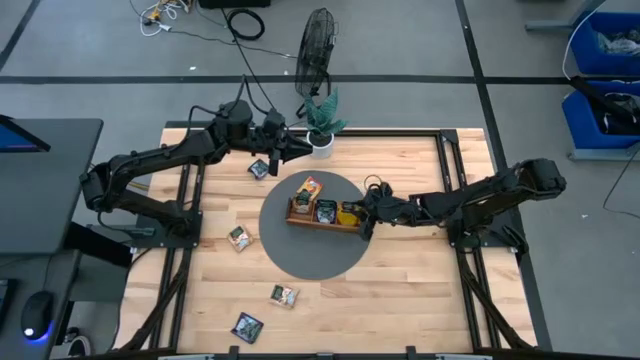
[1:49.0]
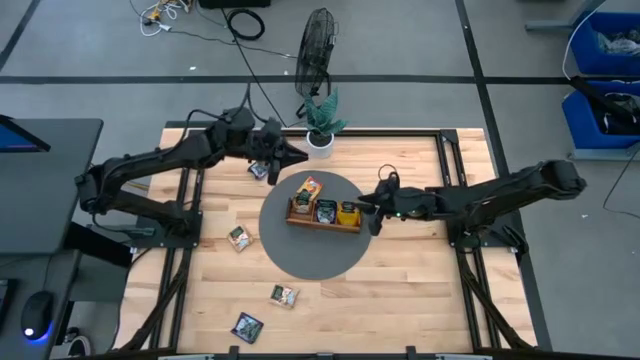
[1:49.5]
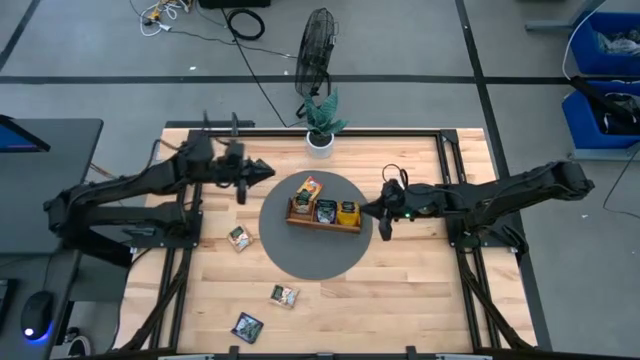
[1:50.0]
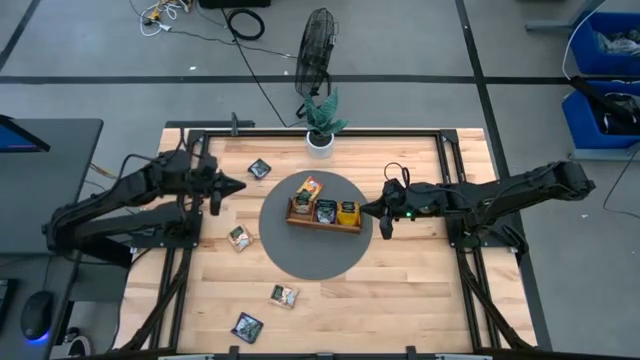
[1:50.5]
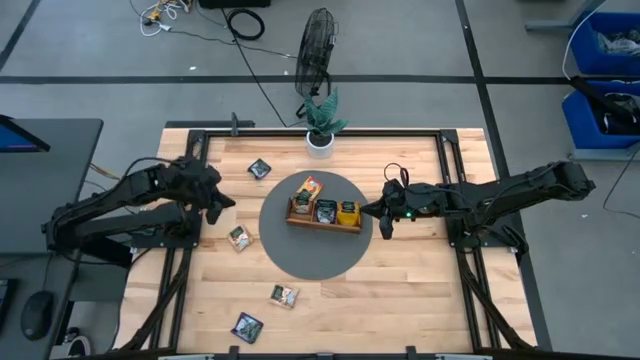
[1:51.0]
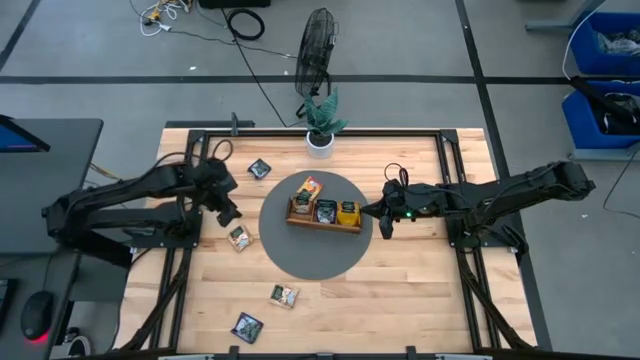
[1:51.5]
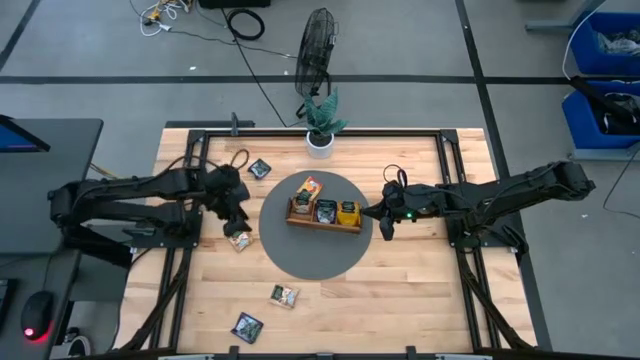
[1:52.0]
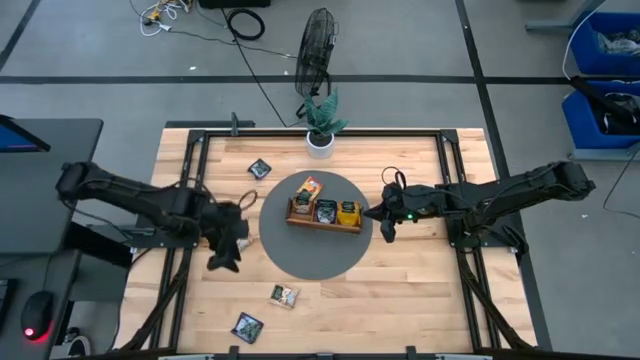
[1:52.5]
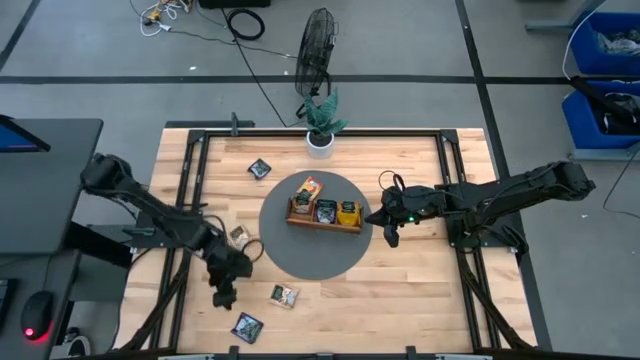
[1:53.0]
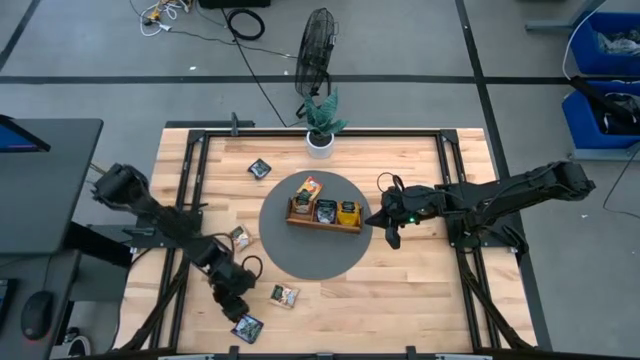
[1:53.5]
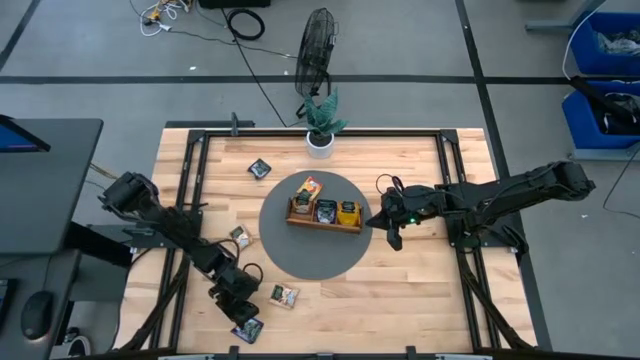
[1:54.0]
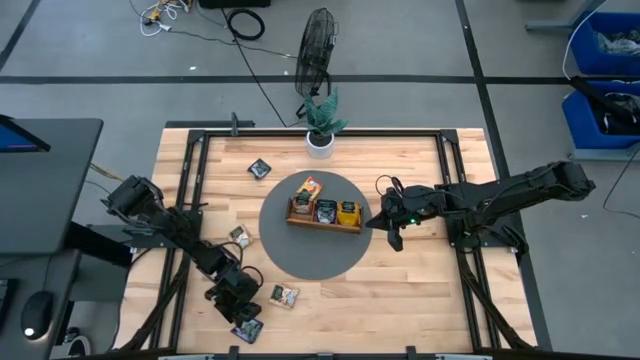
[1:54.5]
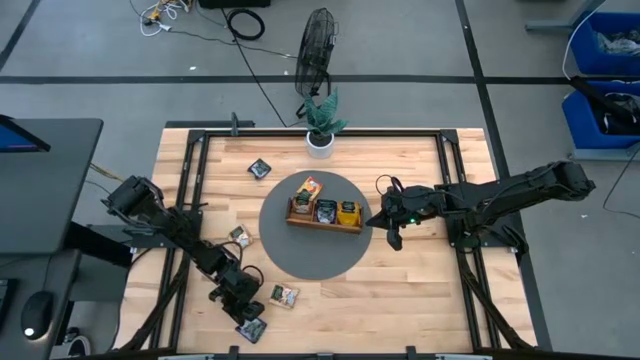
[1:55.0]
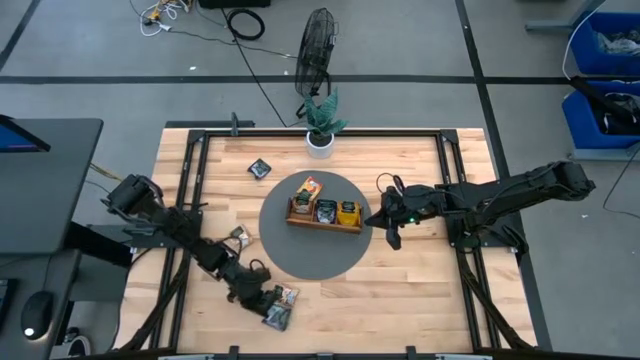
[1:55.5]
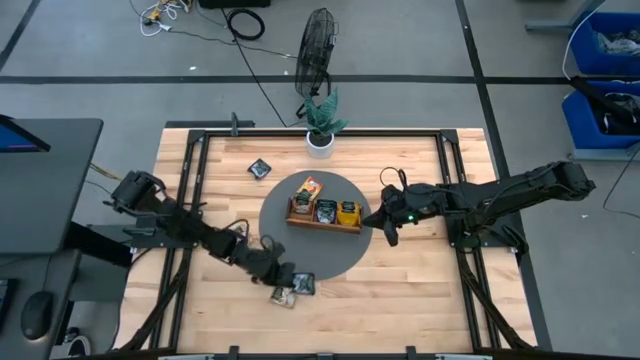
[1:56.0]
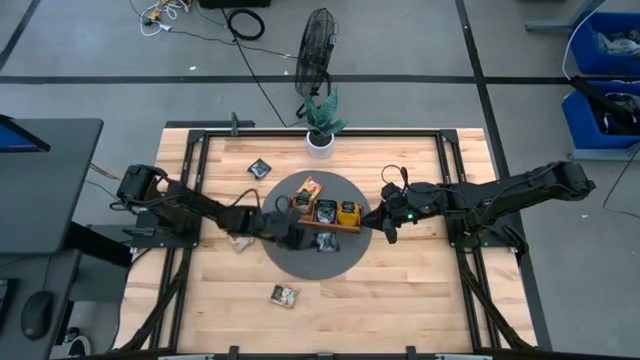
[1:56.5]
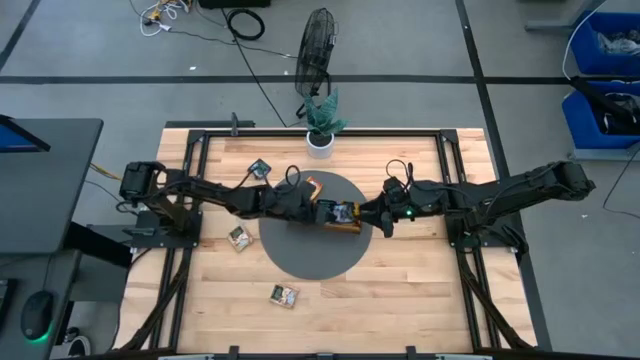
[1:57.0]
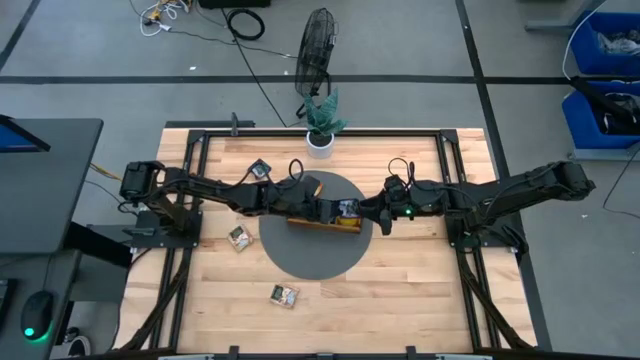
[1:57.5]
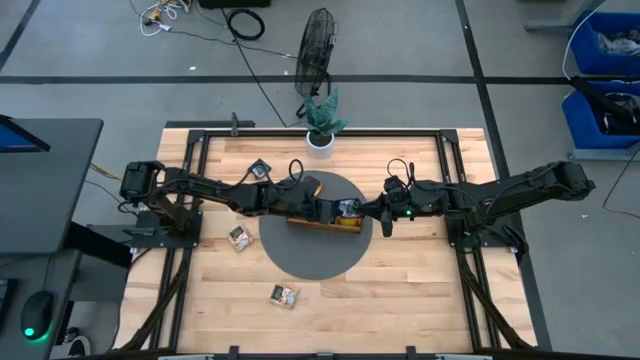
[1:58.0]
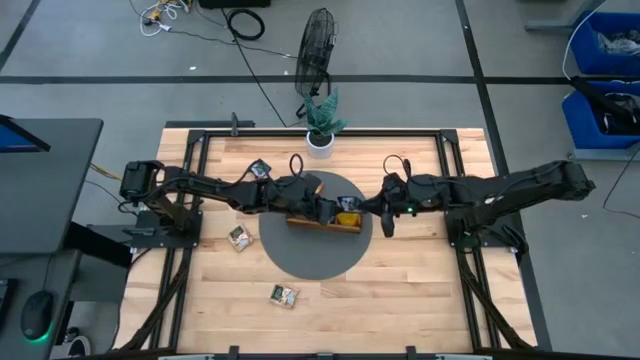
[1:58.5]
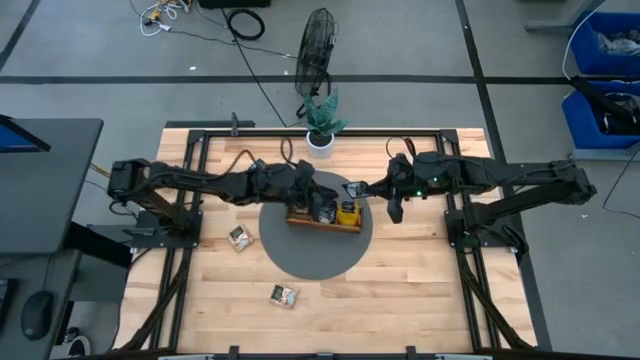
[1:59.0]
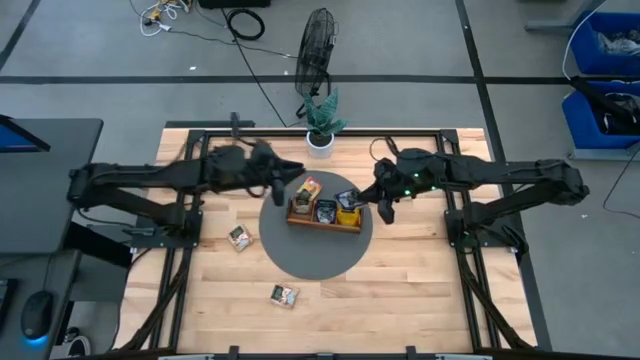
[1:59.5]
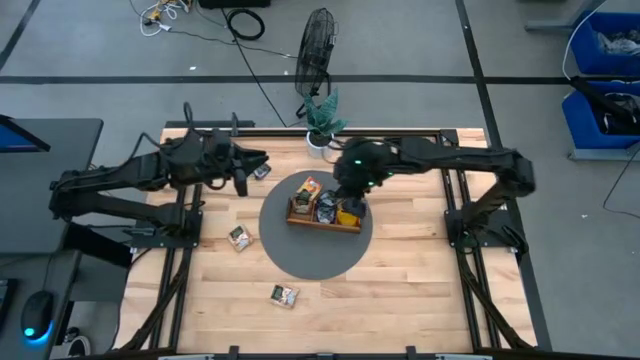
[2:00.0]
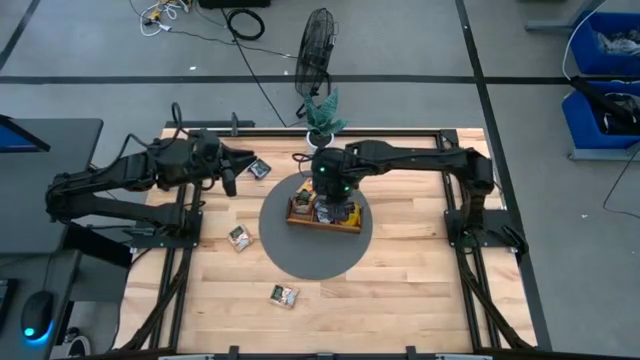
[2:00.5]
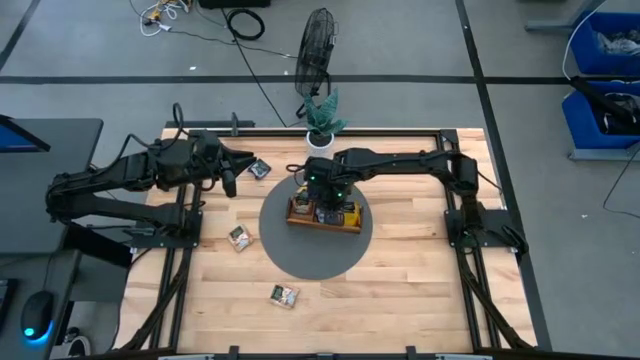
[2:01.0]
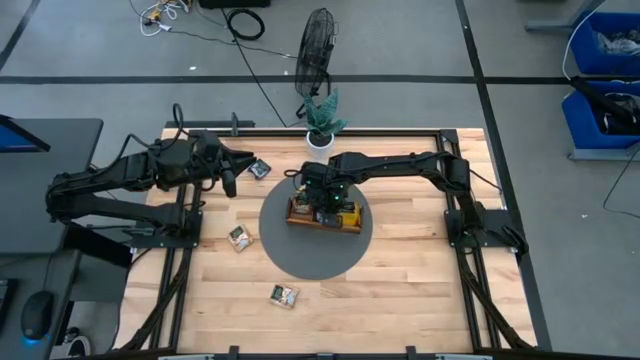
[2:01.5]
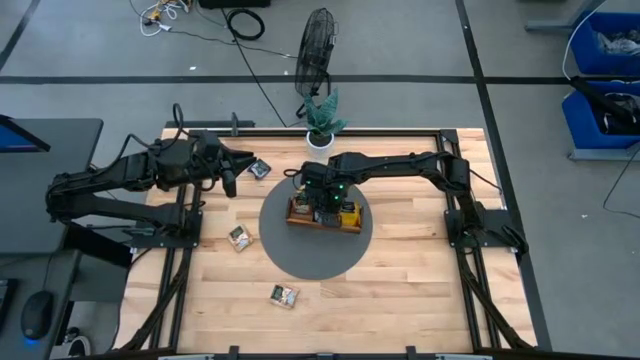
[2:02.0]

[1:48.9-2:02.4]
Task: Pick & Place Tea
Put the blue tea bag into the middle section of the wooden organizer

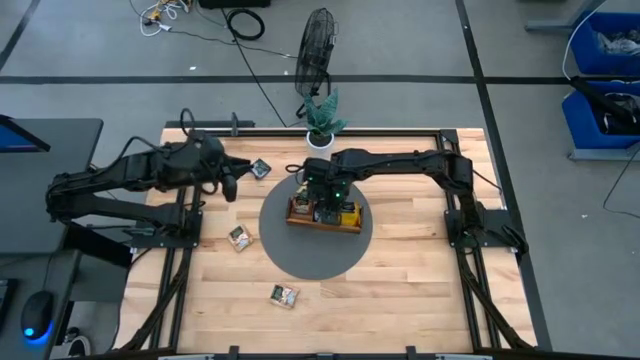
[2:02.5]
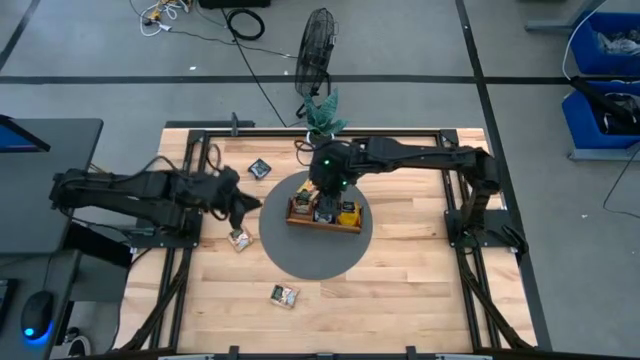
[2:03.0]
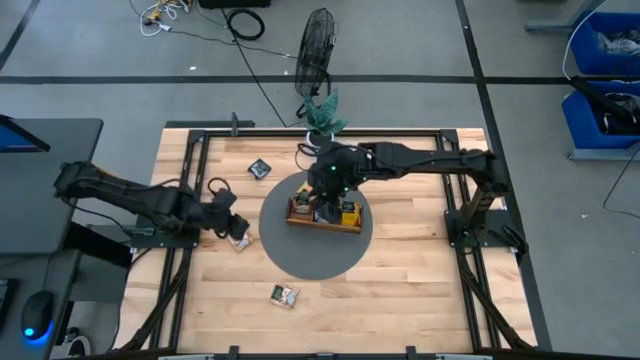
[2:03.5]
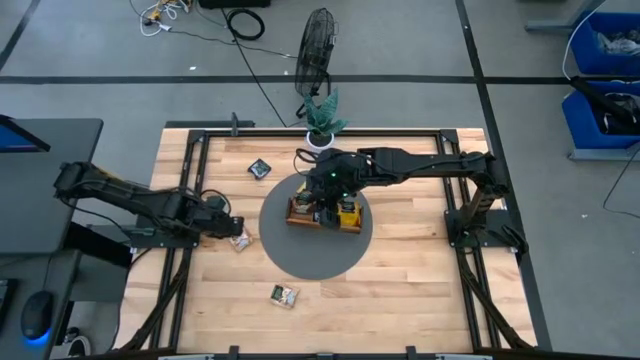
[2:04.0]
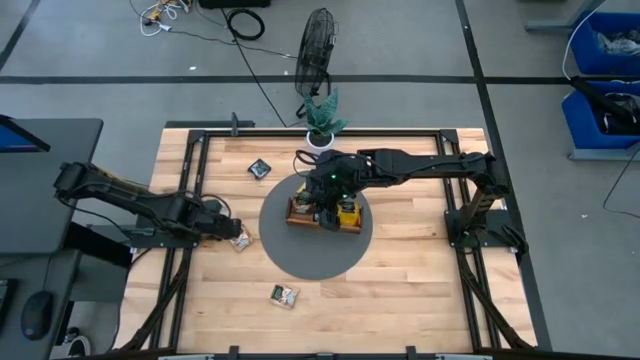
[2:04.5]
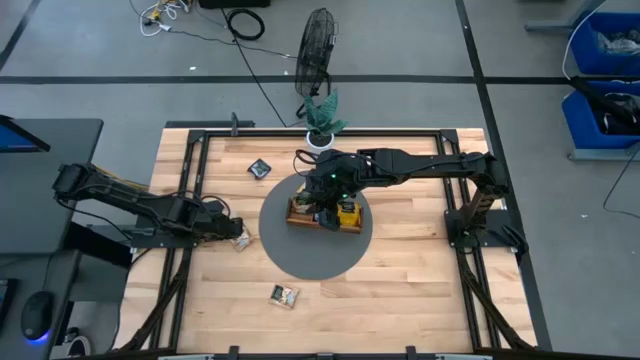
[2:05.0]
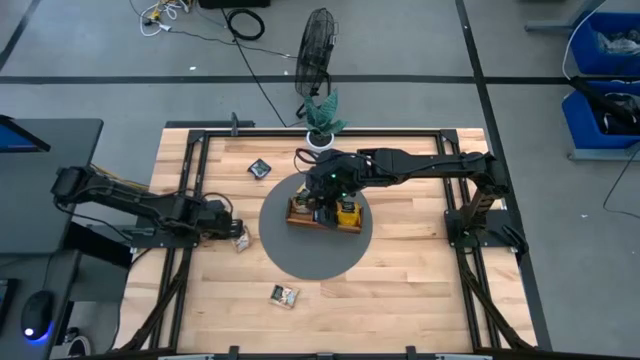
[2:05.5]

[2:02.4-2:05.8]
Put the brown tea bag into the left section of the wooden organizer

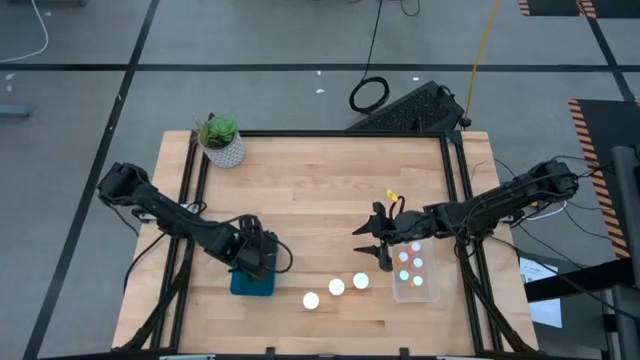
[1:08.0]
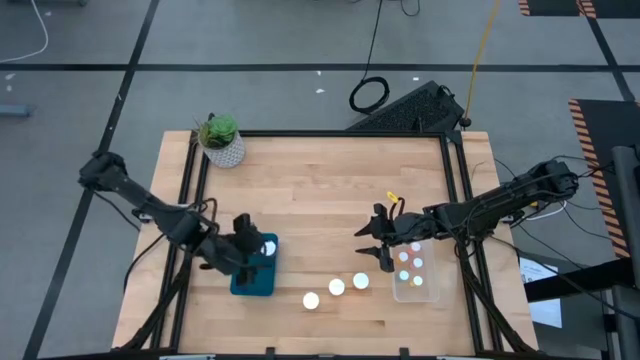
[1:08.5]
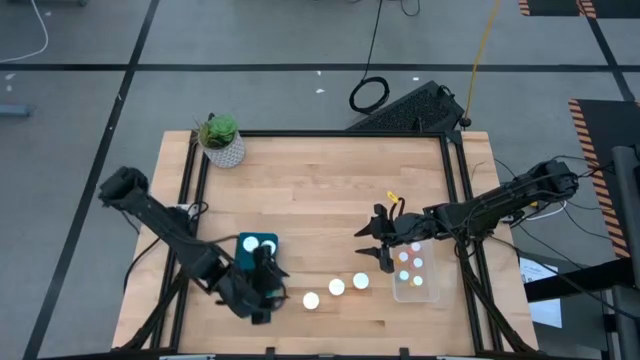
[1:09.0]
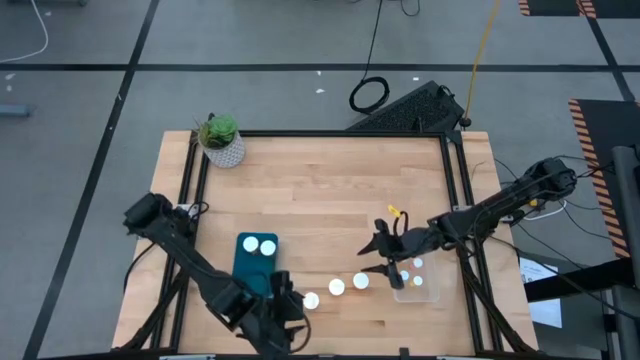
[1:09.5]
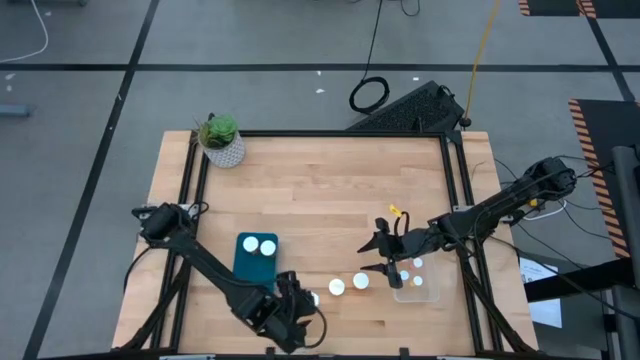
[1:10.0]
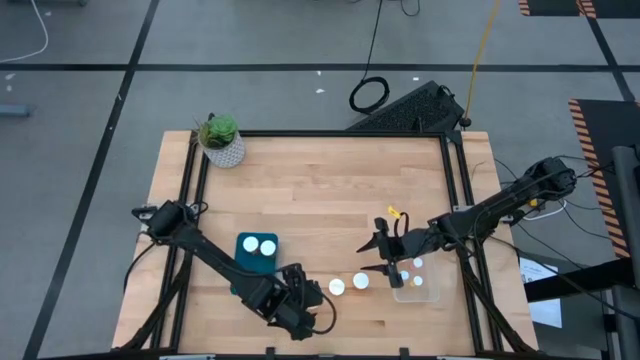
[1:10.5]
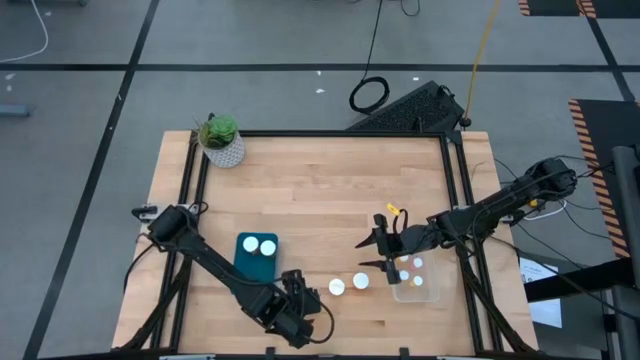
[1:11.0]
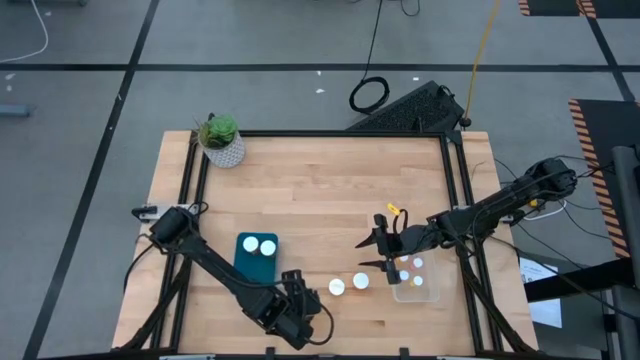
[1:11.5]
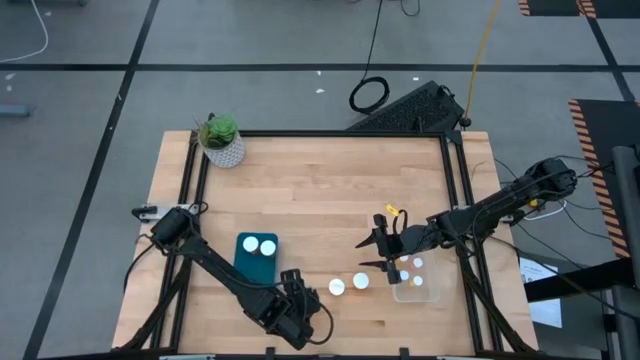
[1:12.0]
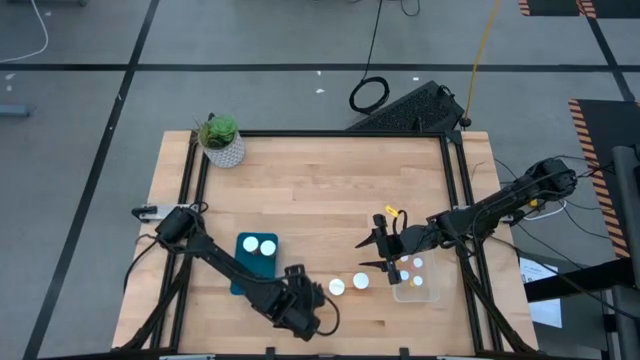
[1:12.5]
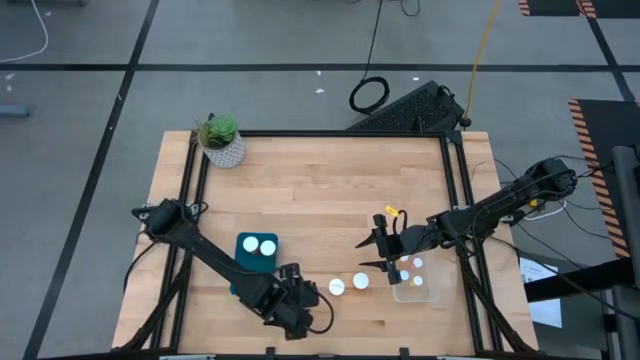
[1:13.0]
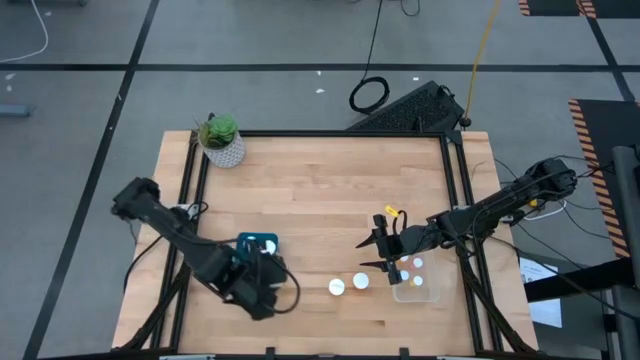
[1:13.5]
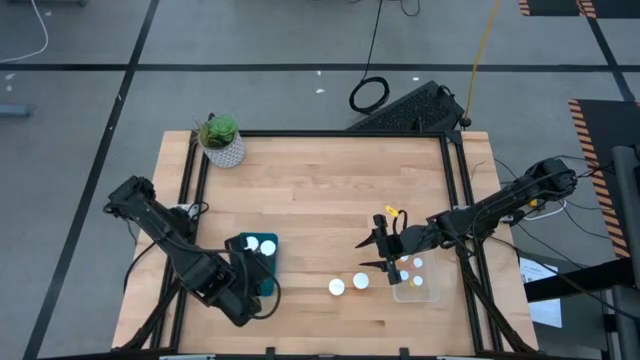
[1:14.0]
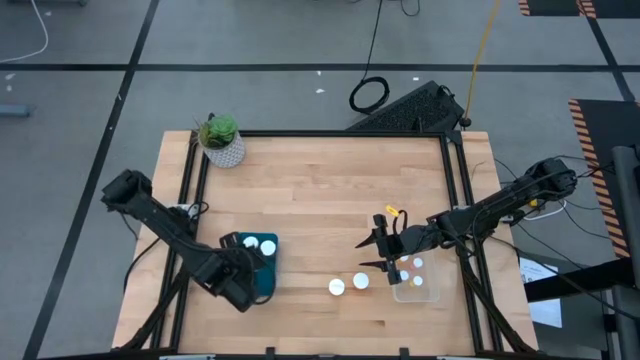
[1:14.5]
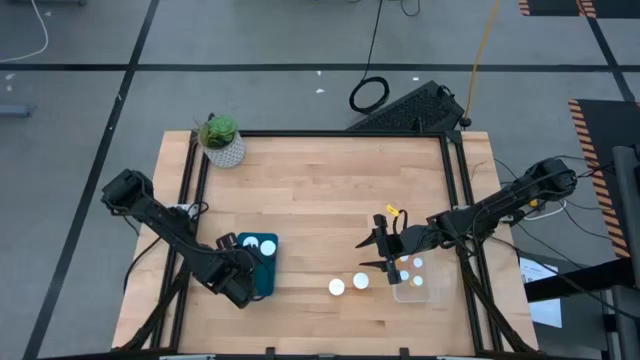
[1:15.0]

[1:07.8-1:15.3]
Task: Pick and place medicine bottles into bin by pill shape (circle, oval)
Put the orange bottled capsule into the blue bin
